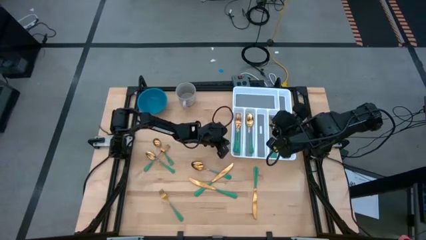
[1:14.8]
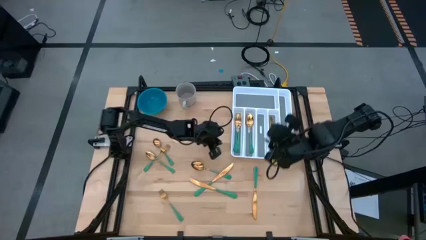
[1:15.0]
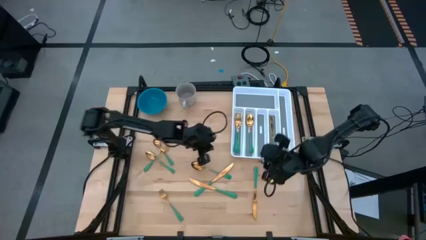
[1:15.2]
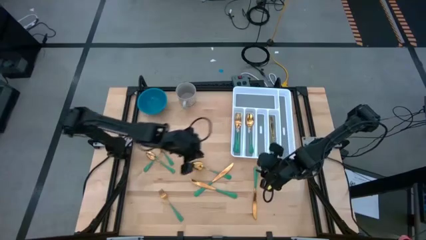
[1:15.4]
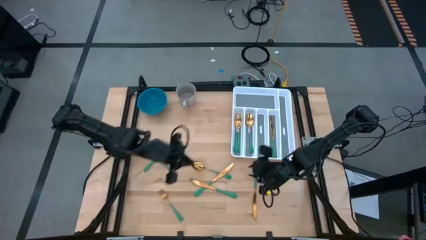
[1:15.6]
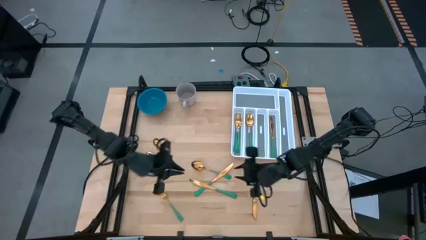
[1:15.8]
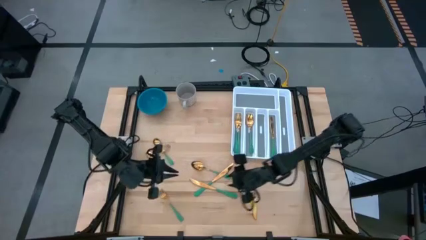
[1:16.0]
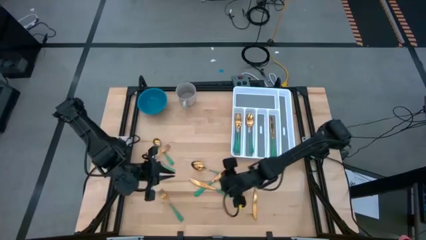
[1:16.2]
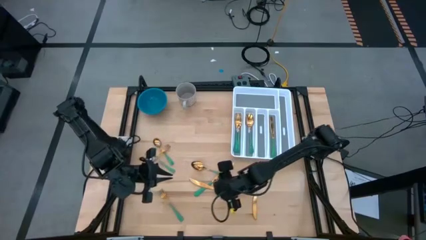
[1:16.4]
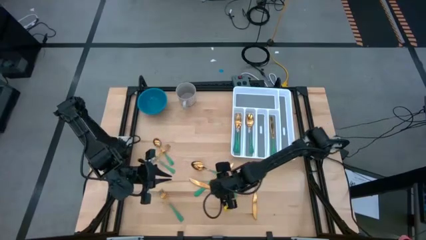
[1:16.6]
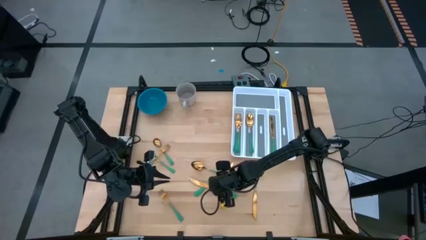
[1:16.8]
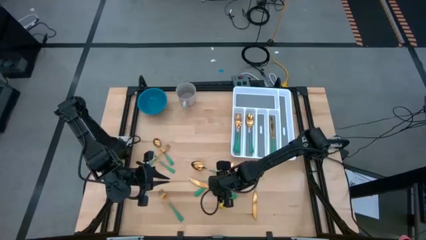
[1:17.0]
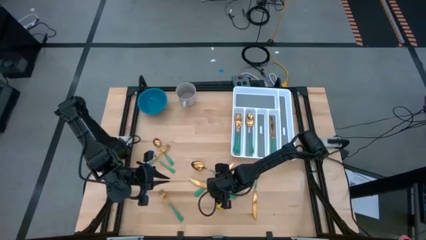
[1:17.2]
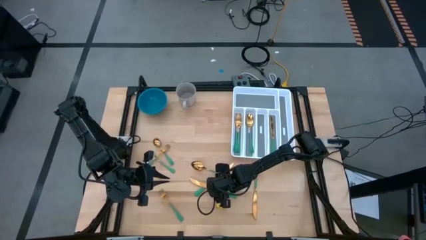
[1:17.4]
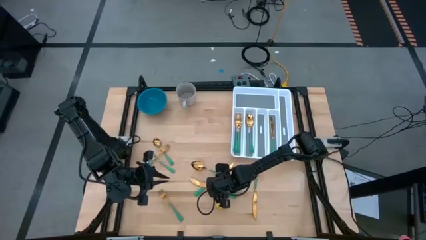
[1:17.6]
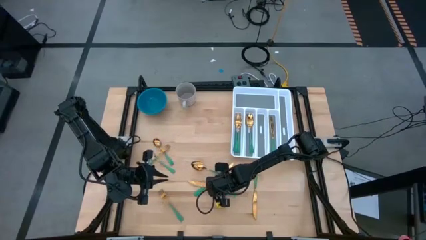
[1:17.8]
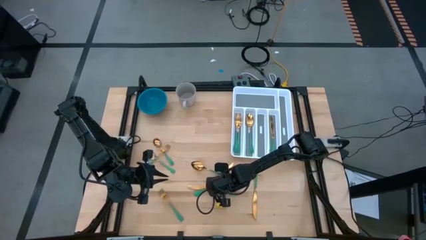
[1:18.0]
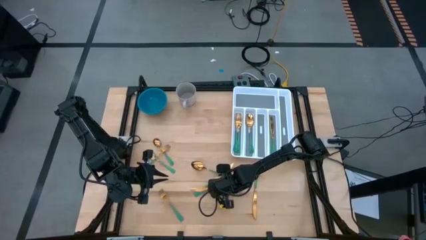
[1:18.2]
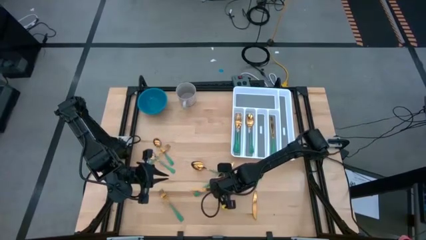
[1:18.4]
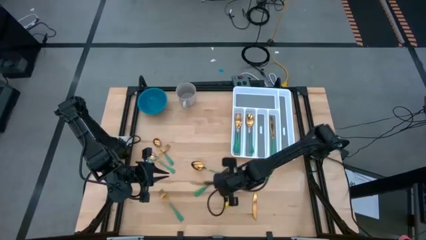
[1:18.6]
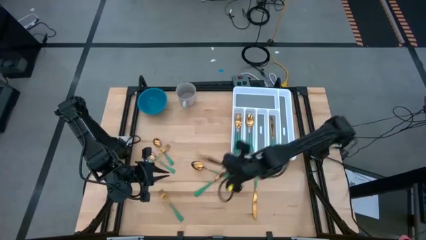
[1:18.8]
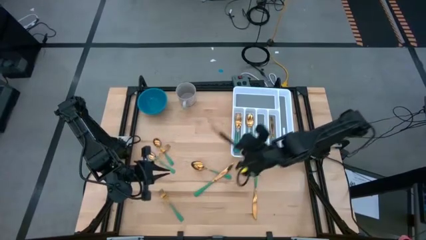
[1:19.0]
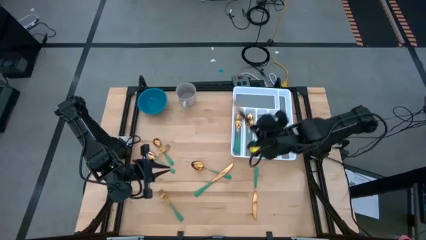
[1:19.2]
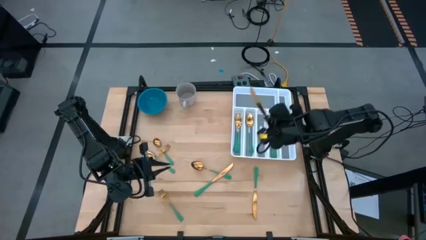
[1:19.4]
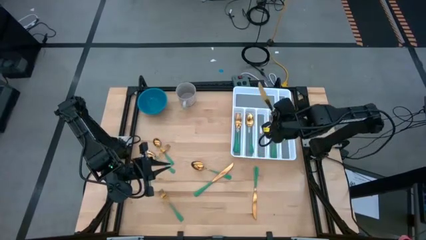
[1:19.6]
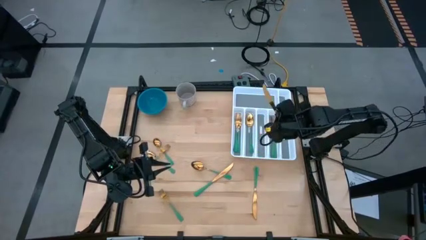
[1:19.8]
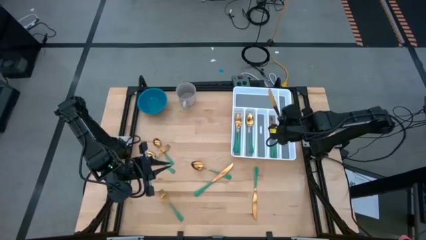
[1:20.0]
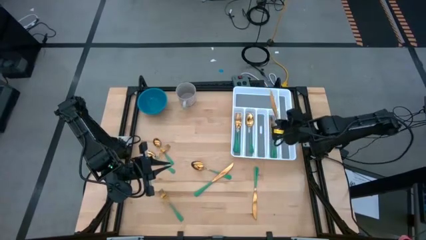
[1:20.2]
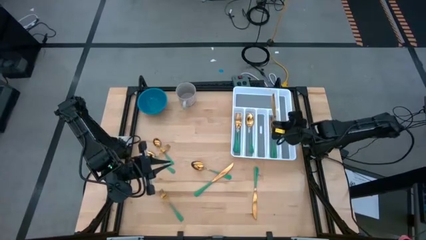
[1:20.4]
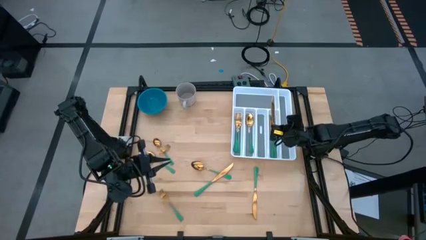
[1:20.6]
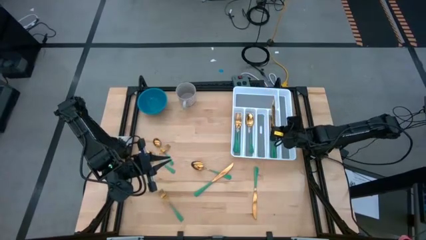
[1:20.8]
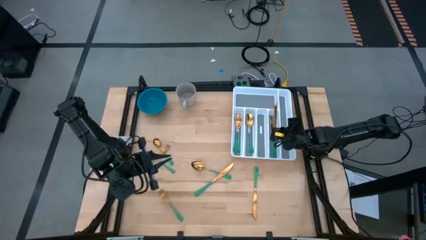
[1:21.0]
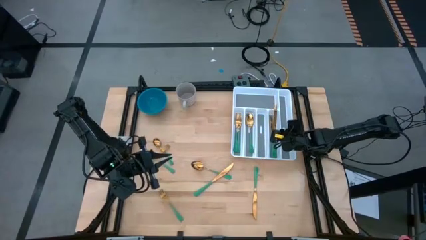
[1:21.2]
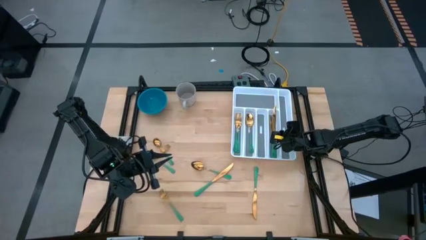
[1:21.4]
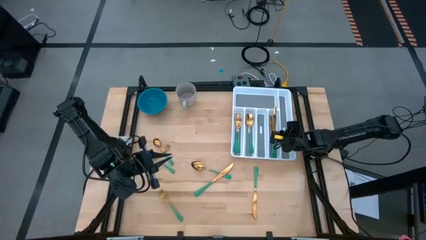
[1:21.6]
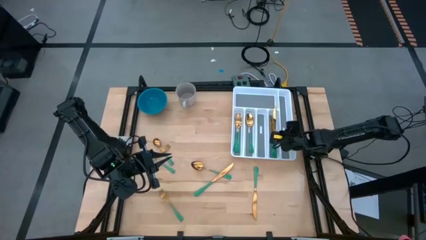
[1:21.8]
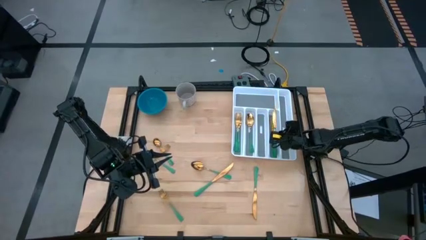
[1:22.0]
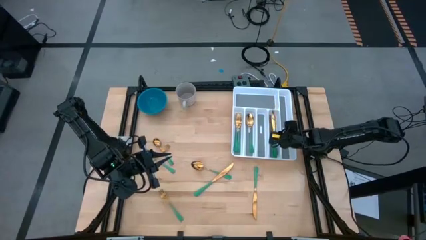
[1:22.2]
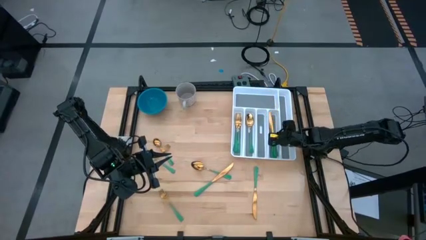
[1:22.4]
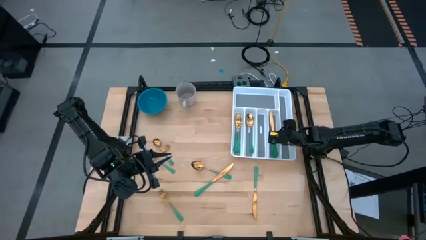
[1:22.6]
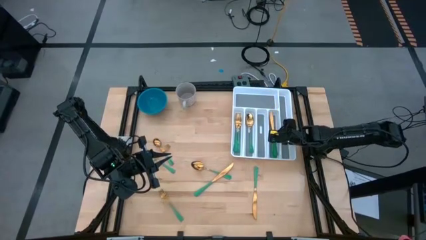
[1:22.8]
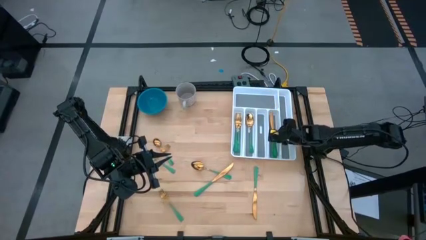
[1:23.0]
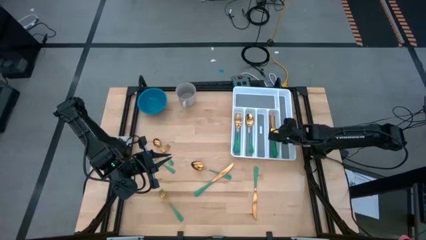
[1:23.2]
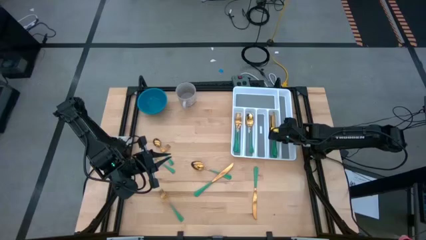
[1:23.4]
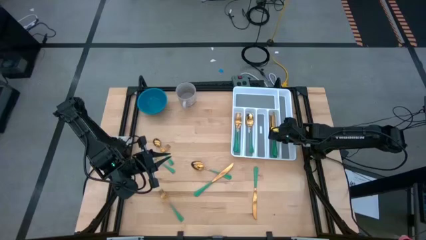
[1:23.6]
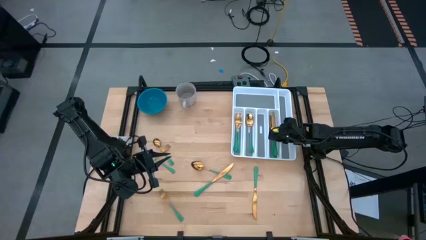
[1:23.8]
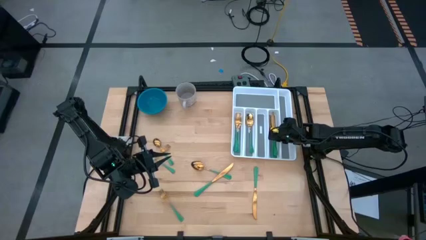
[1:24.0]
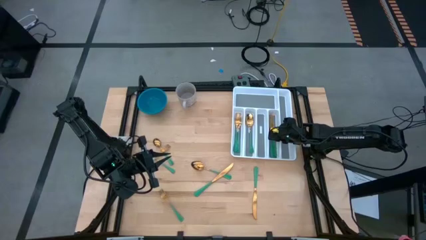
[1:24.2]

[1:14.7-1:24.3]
Task: Sort silverware
Put the green knife into the white silverware organizer

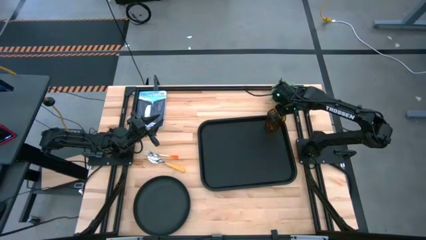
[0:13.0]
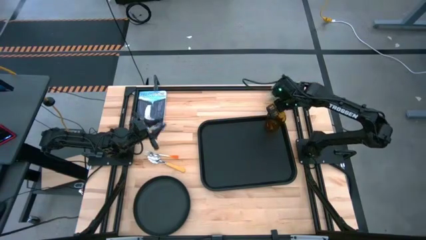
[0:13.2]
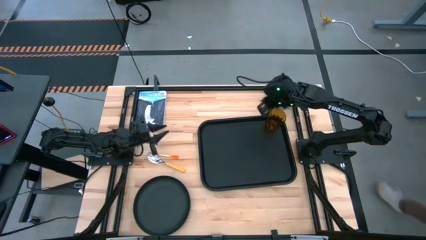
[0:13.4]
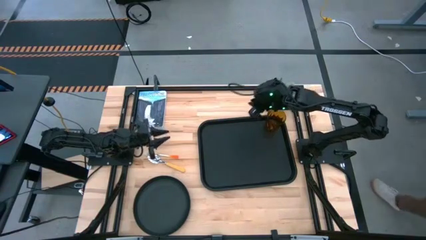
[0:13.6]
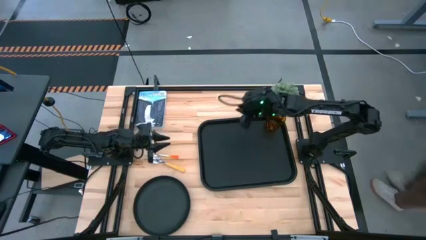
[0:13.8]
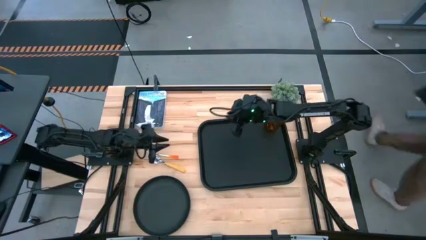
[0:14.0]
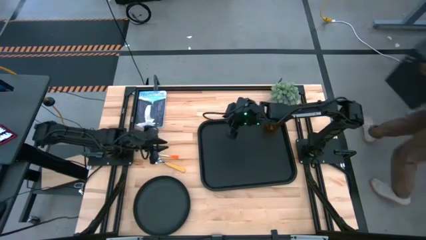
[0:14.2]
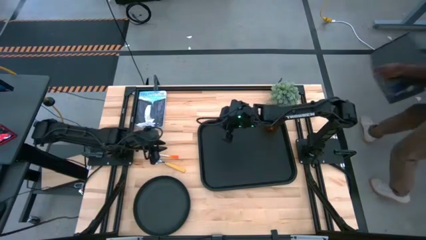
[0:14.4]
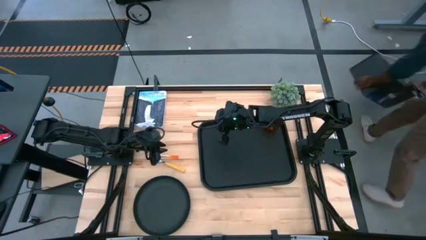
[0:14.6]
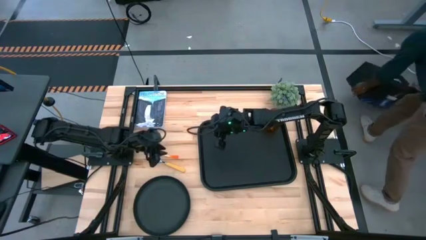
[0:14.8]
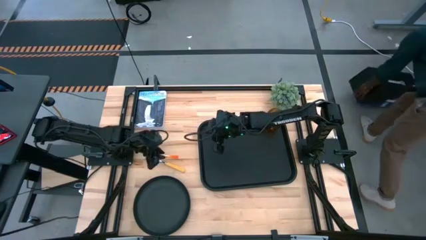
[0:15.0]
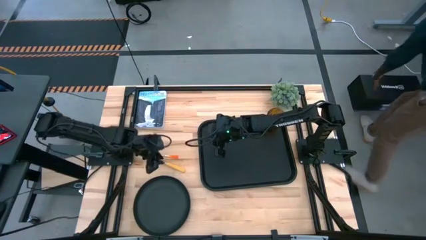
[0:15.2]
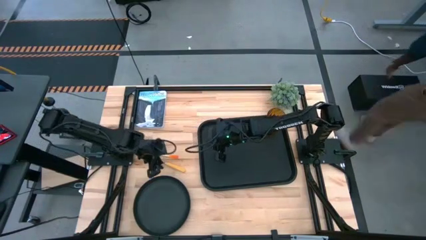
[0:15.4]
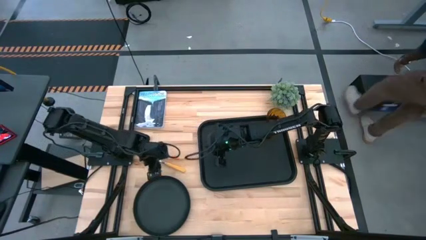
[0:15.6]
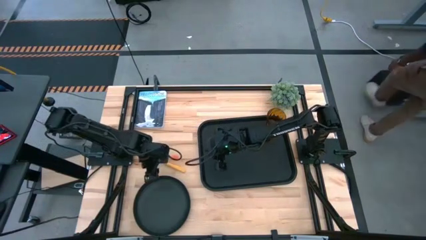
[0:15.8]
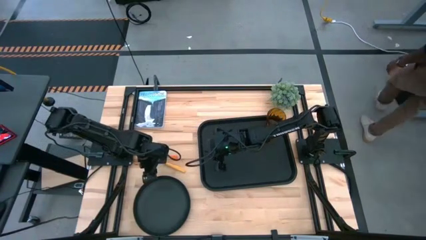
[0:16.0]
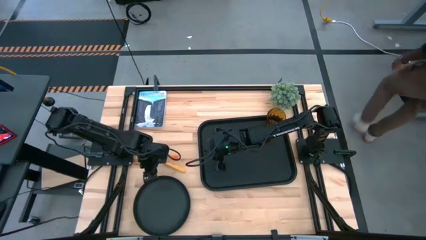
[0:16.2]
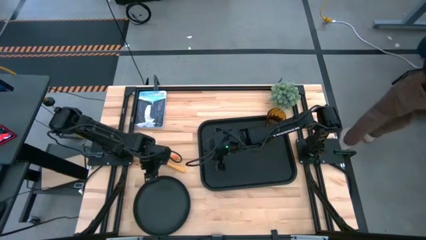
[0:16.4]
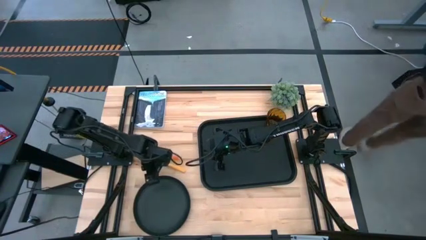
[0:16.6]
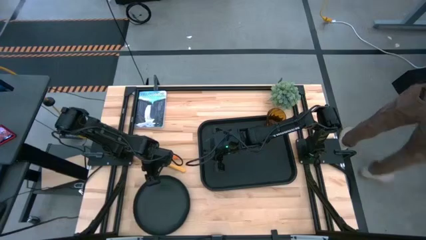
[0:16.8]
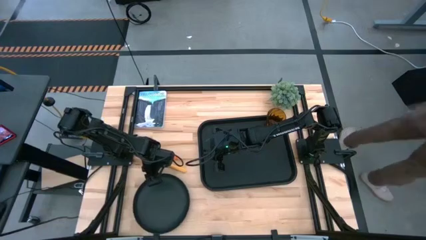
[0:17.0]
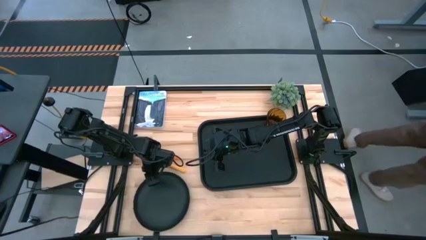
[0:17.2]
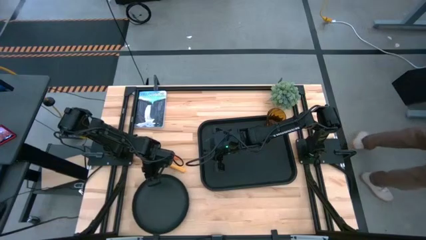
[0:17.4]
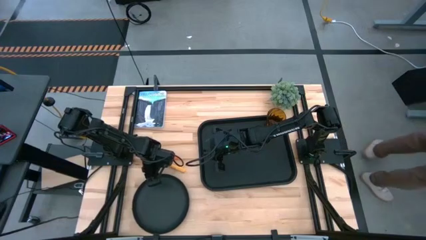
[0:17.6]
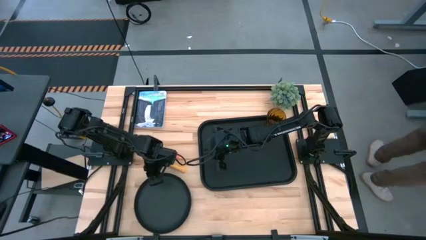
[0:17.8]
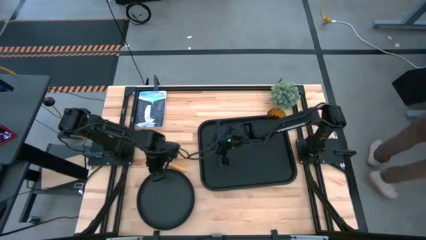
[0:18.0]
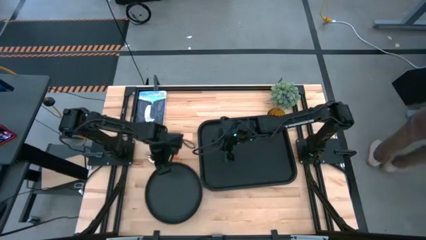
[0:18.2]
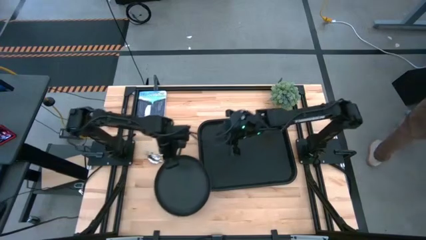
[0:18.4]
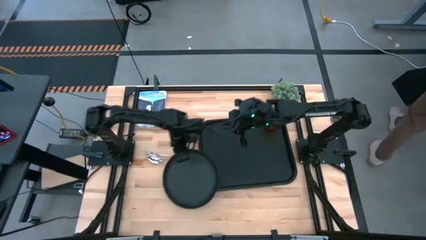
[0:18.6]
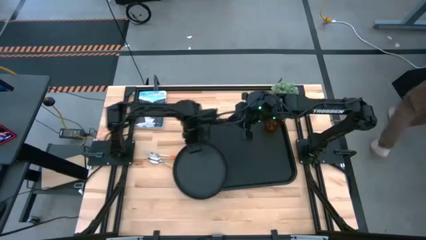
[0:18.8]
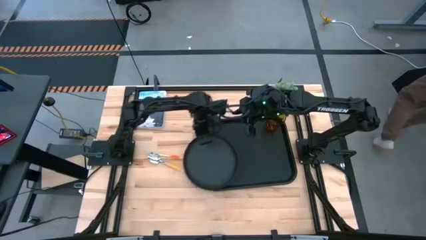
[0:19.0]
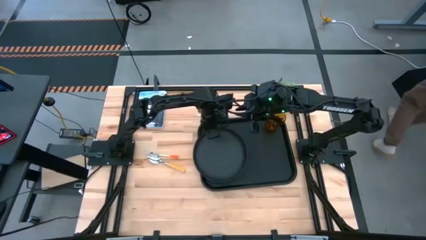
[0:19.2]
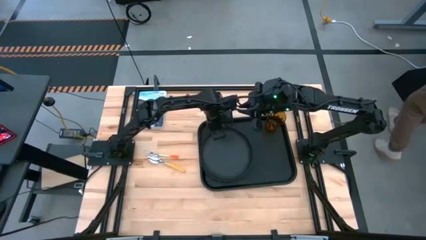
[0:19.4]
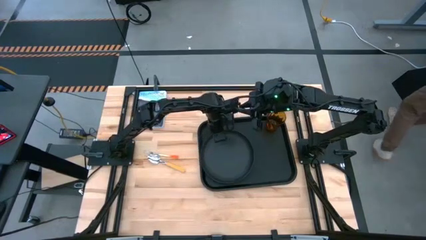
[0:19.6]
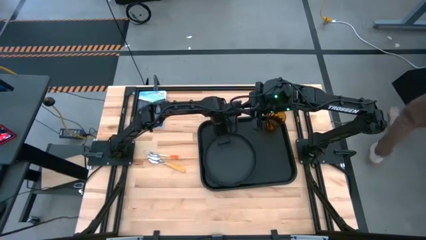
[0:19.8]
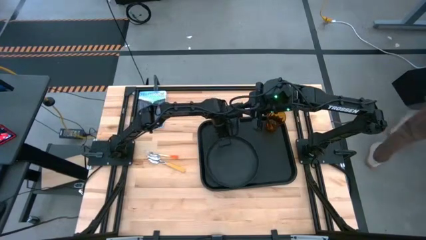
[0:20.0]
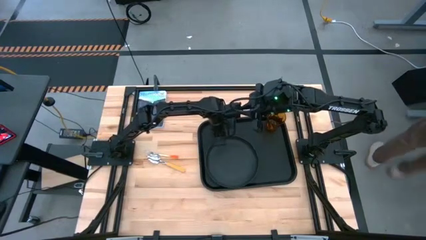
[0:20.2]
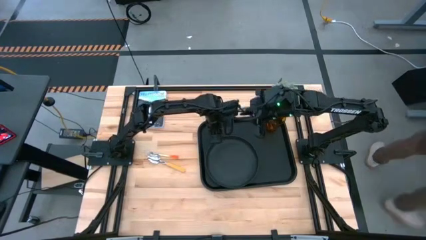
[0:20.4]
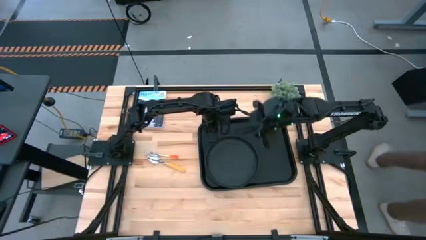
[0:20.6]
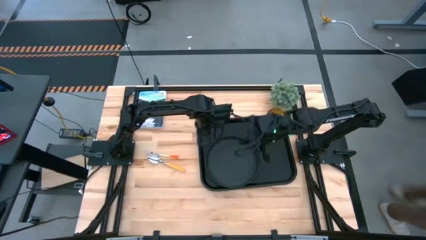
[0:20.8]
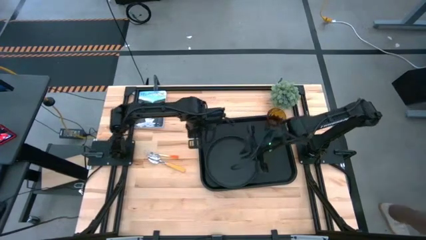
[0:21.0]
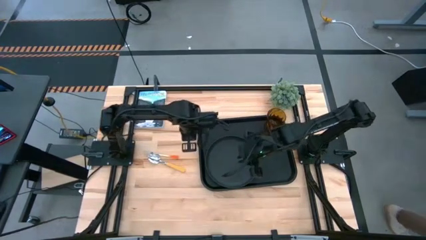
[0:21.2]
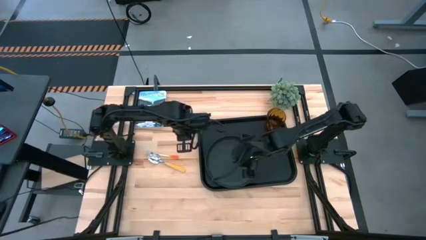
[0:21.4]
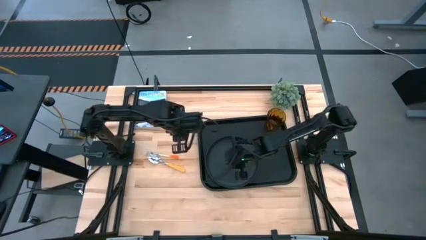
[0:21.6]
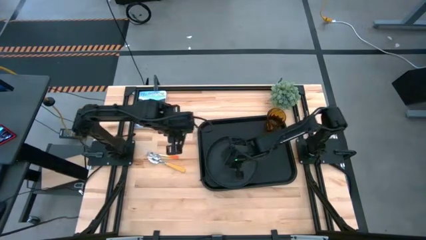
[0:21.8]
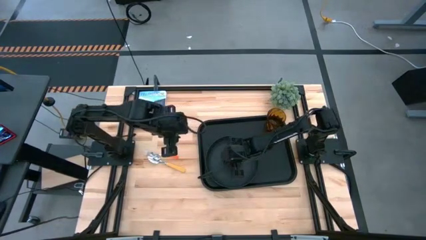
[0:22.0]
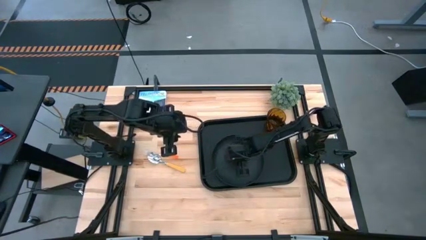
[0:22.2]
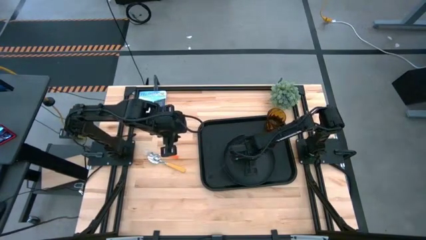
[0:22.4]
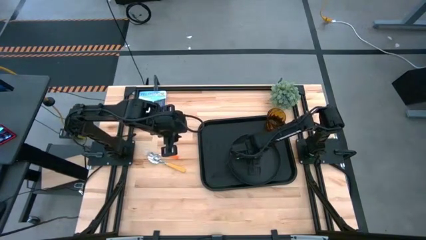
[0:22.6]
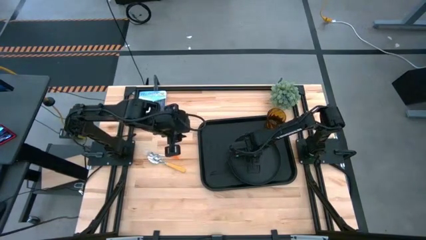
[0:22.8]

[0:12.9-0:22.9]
Task: Pick and place plate/cup/fork/spoon on tray
Put the black plate on the black tray
